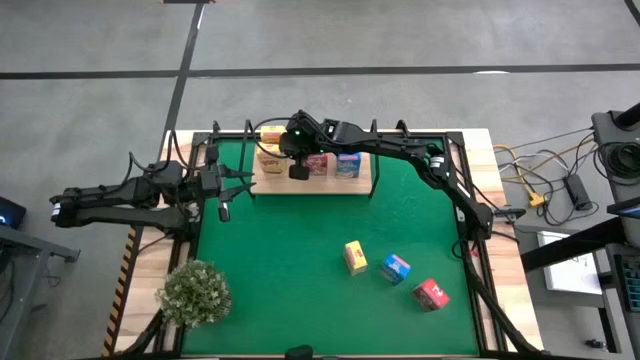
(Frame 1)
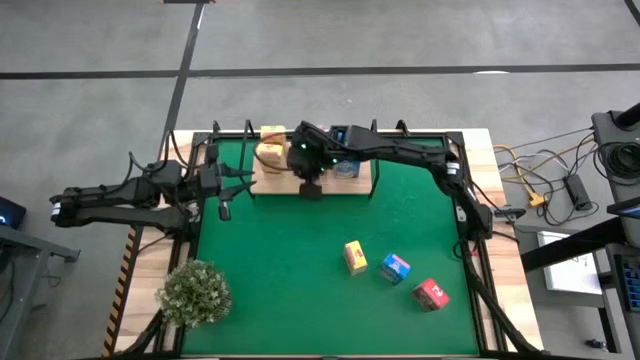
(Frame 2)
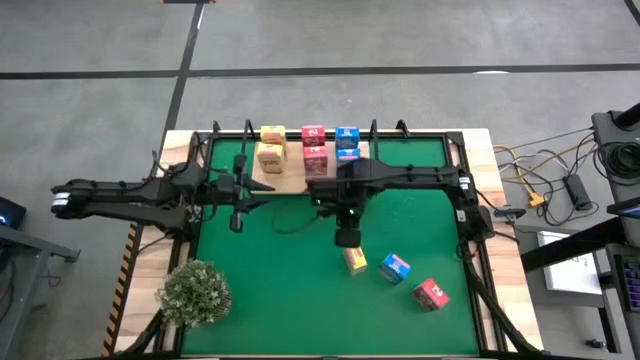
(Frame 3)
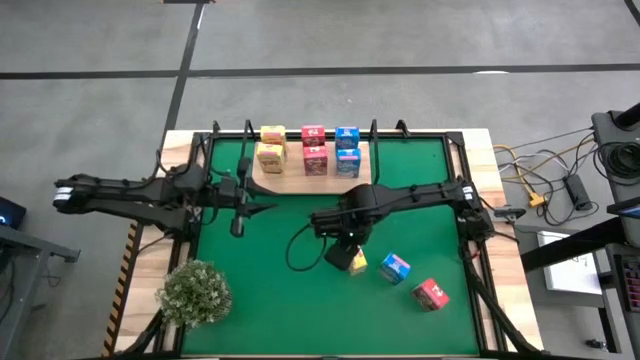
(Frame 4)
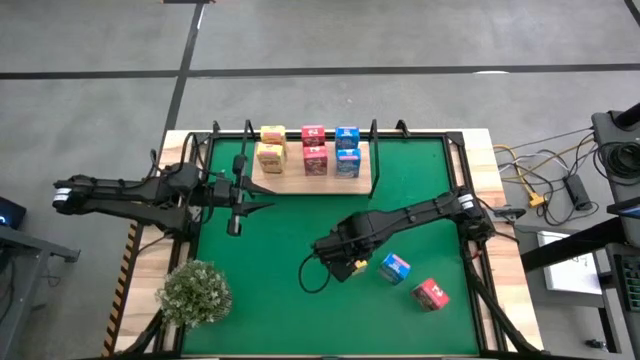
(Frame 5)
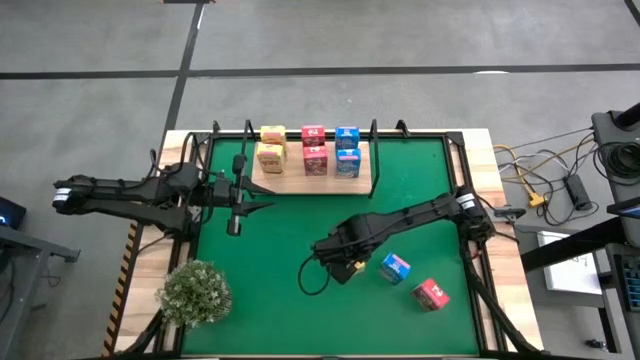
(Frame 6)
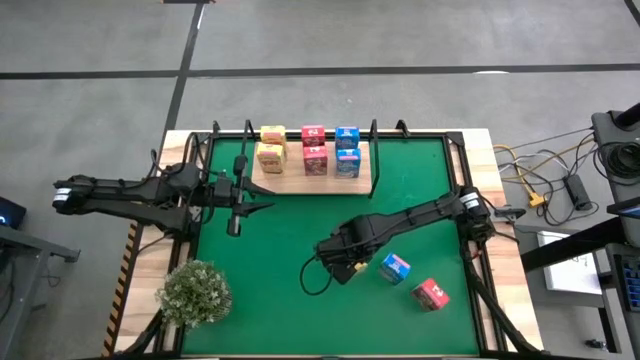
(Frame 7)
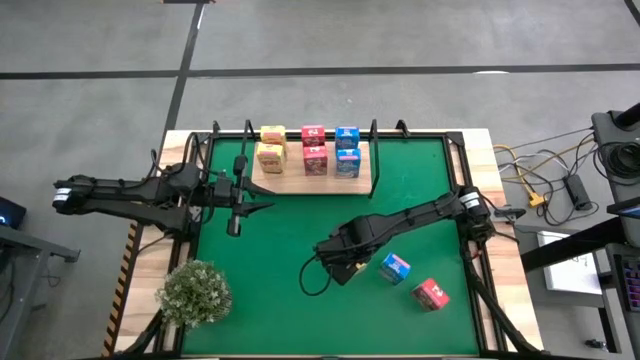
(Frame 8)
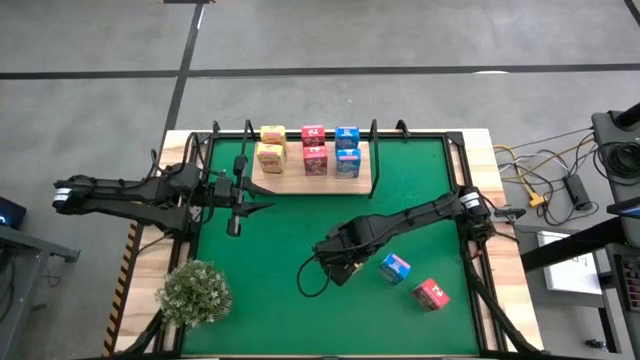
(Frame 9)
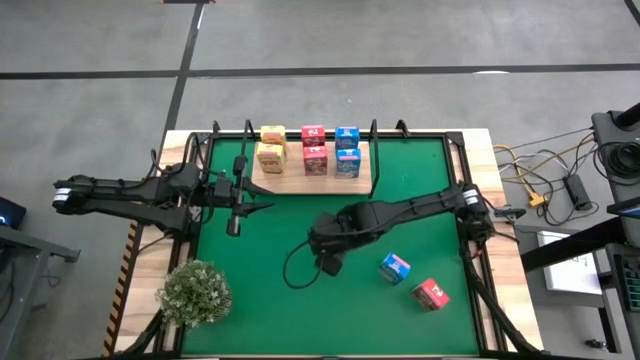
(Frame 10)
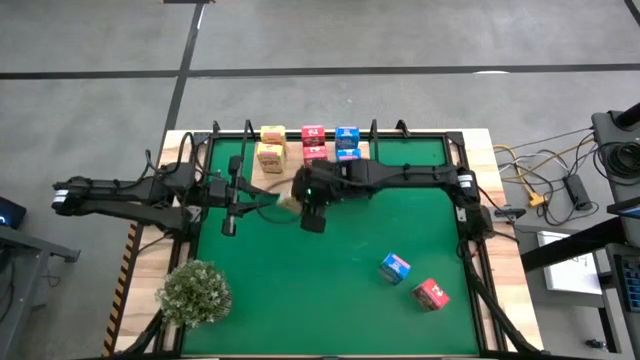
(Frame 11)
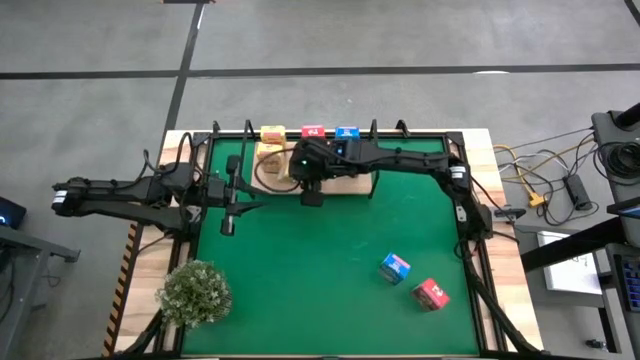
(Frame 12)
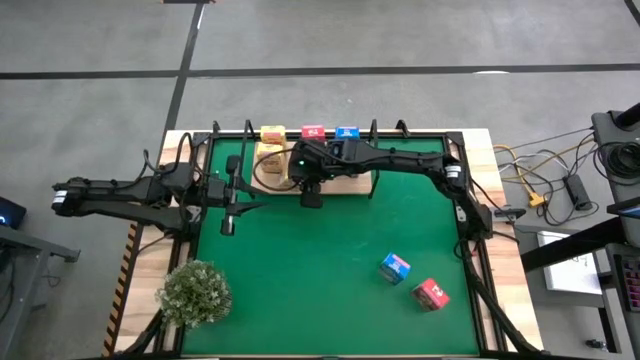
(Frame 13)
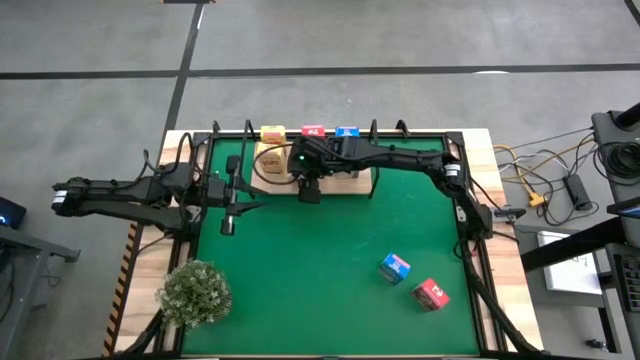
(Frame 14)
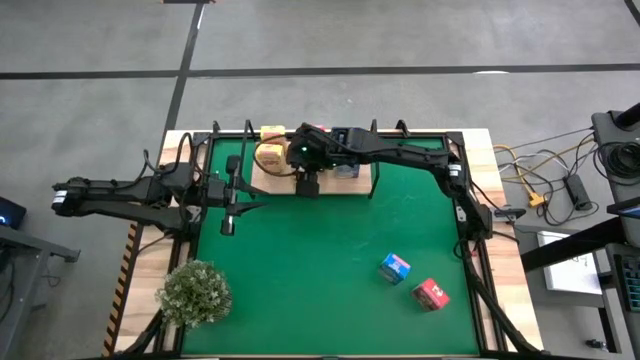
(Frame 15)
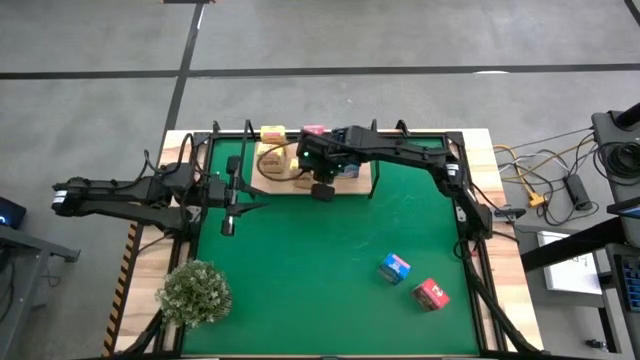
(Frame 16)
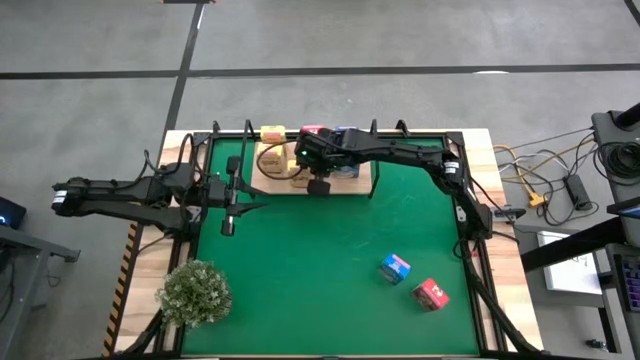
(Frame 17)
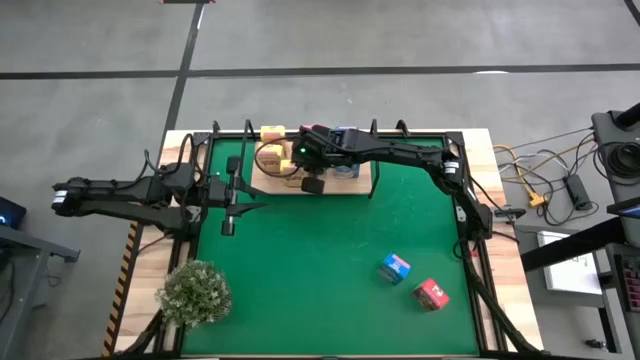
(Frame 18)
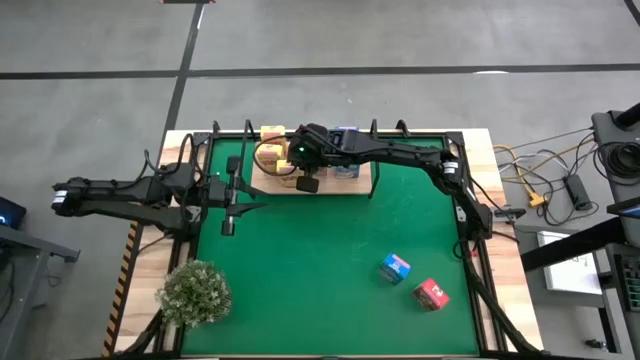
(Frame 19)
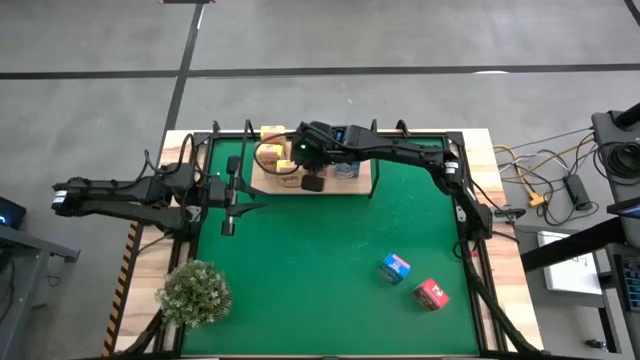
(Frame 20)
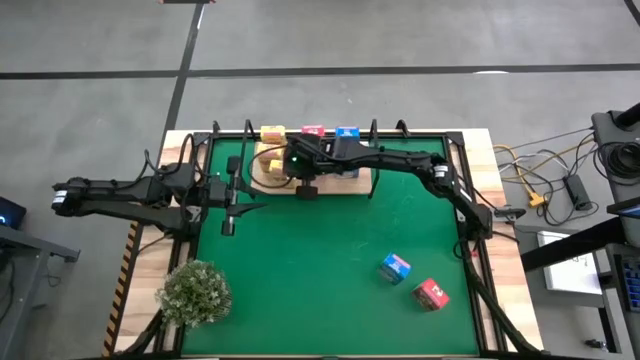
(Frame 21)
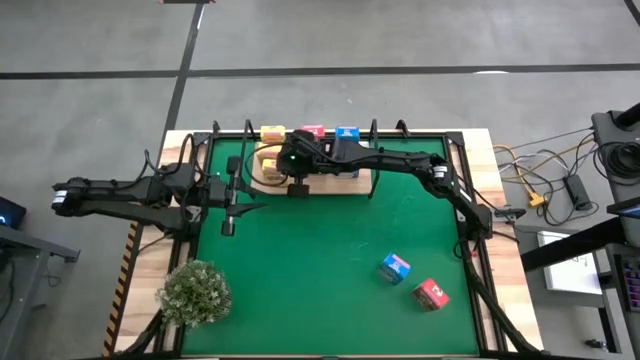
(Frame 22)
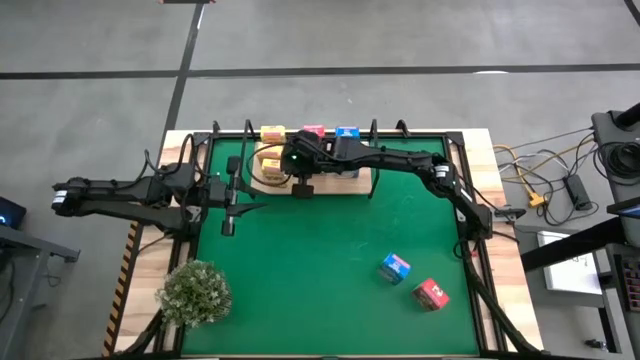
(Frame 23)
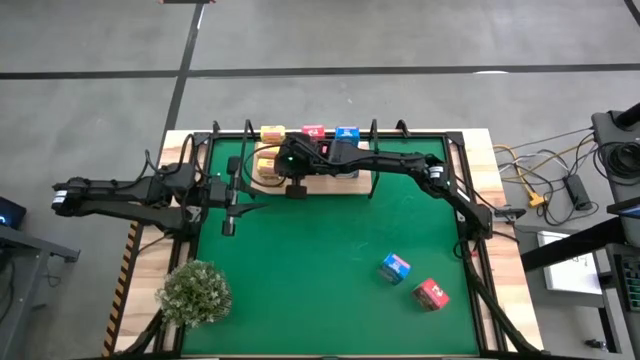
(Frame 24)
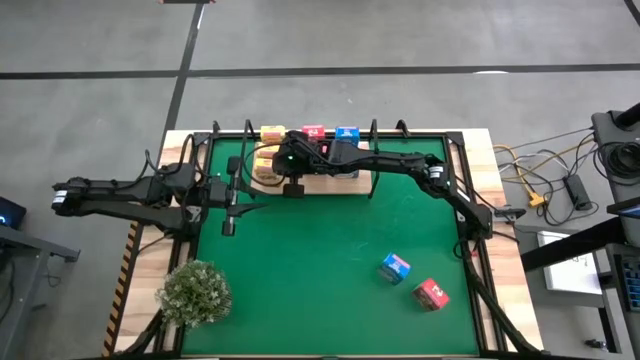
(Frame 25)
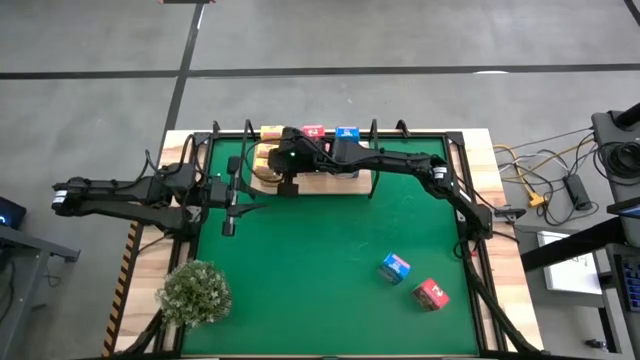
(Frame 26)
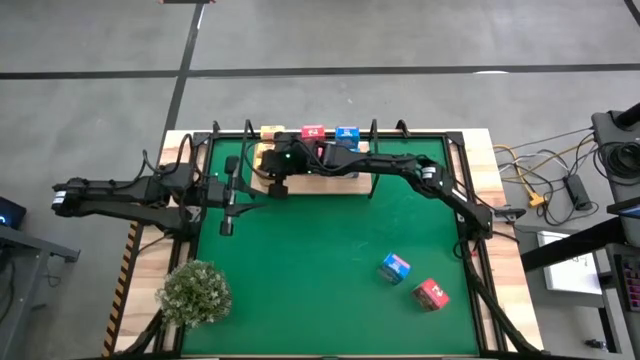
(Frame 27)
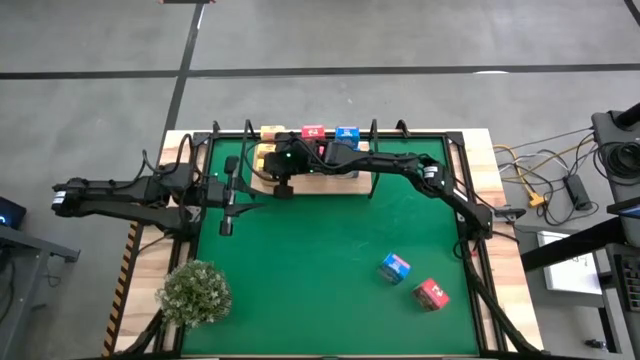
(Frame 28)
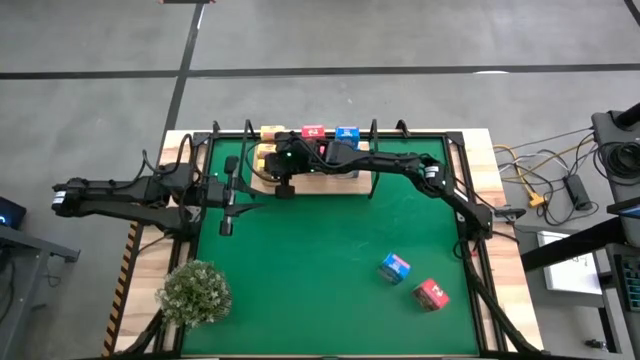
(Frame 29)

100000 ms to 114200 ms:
Task: Stack cereal on shelf
Put the yellow cereal box on the shelf aligned with the other yellow cereal boxes

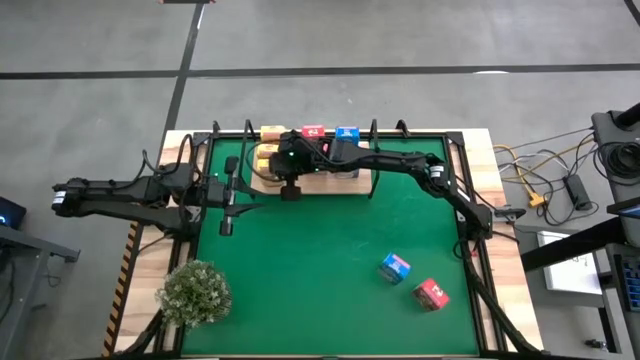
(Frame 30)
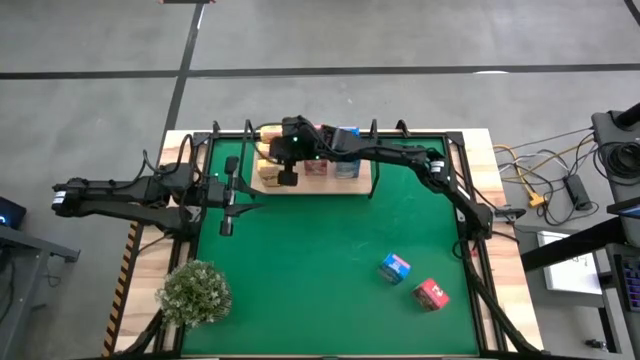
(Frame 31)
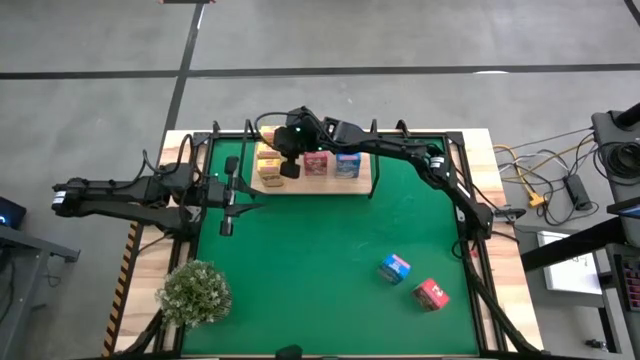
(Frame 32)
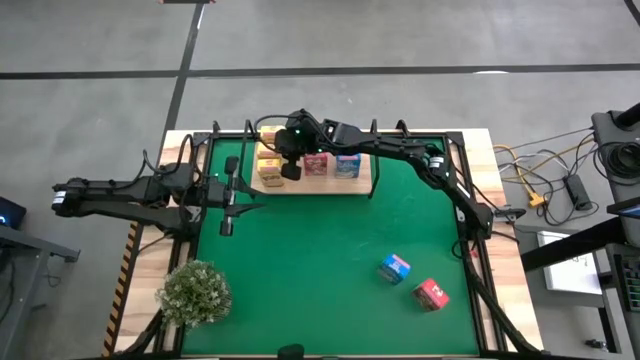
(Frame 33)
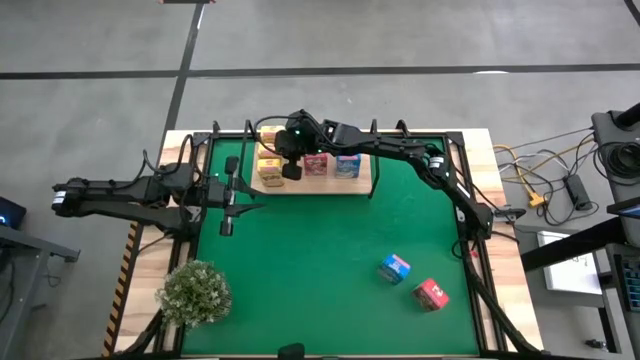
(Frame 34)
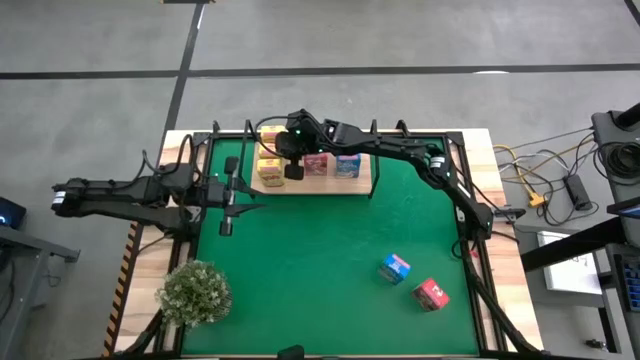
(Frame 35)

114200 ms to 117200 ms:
Adjust the yellow cereal box on the shelf

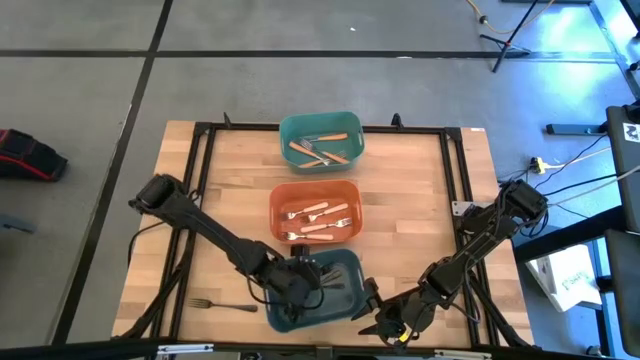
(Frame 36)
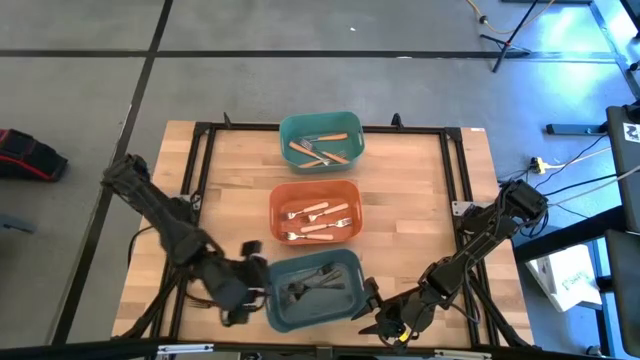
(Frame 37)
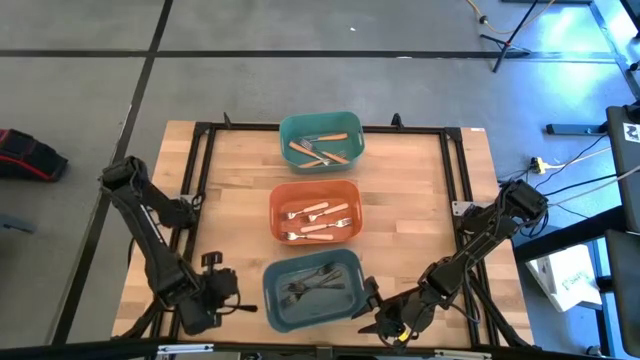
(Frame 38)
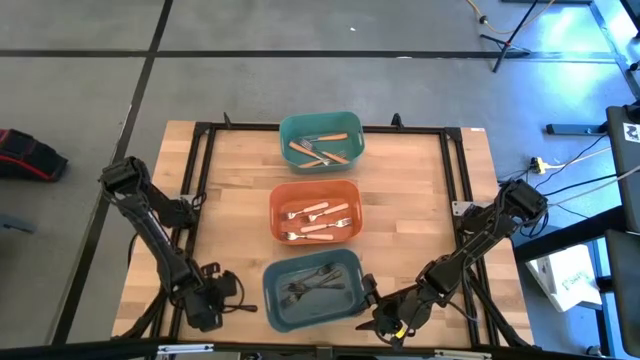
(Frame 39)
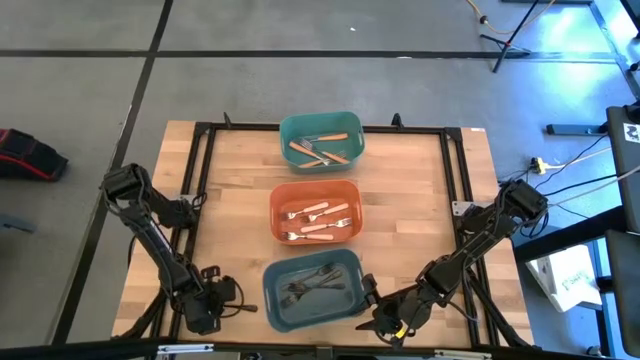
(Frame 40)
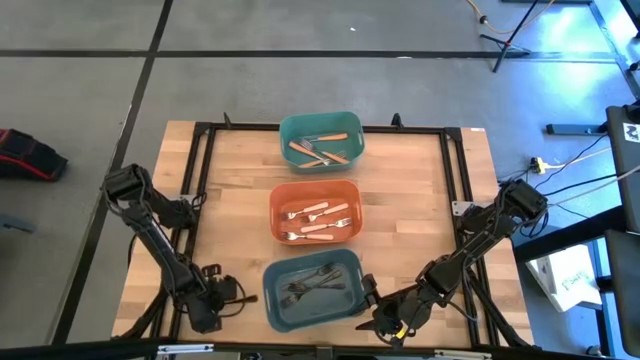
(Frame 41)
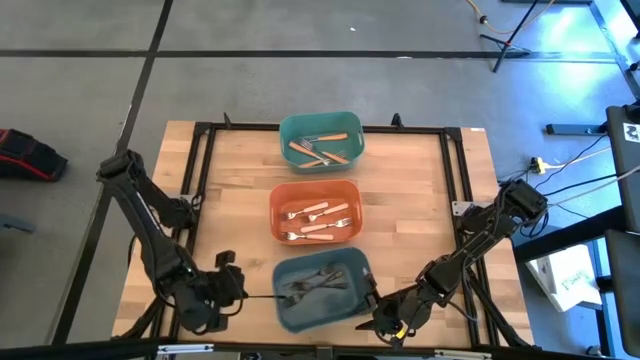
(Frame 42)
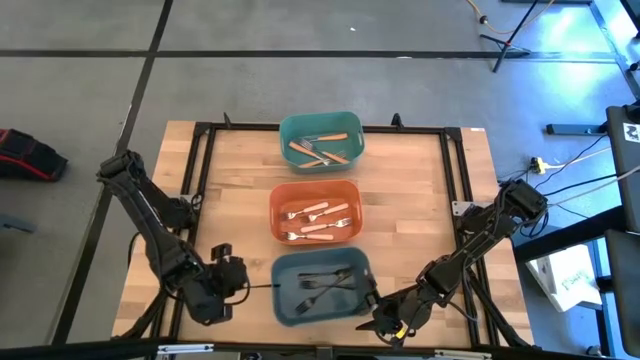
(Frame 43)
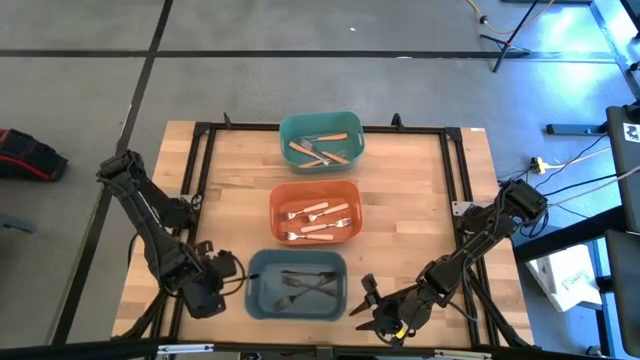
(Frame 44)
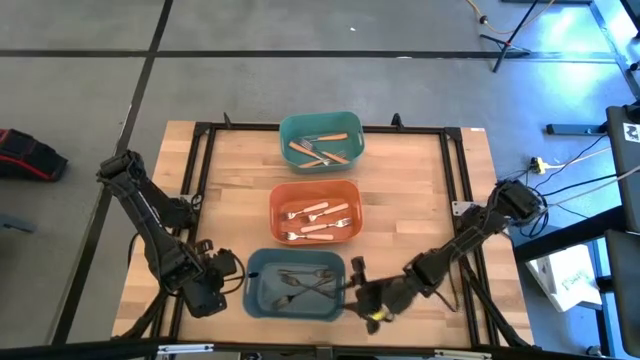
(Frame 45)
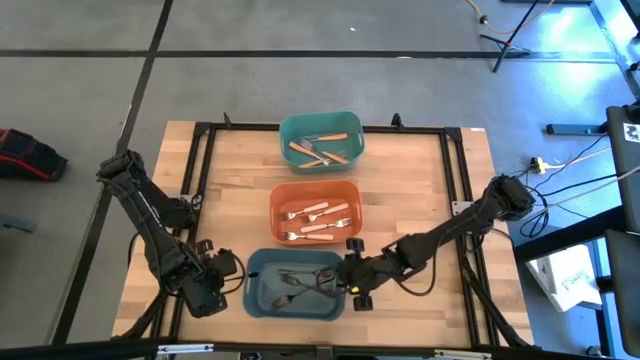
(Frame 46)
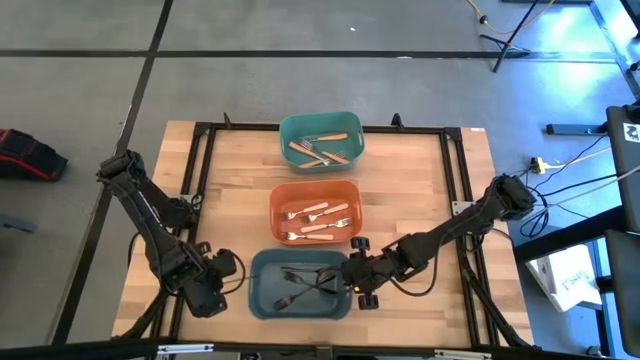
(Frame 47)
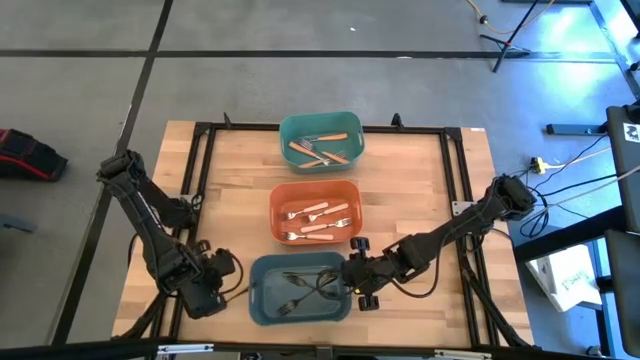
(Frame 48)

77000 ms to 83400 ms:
Task: Sort silverware by color (type)
Put the black fork into the blue bin
